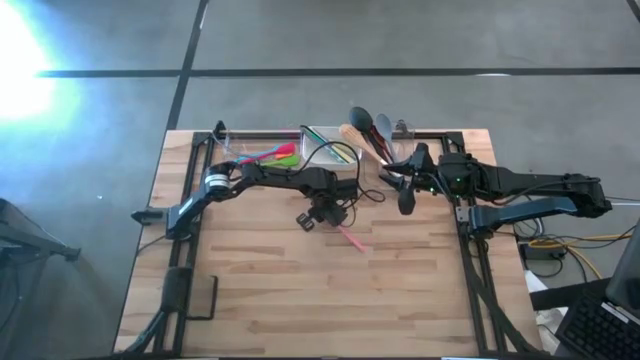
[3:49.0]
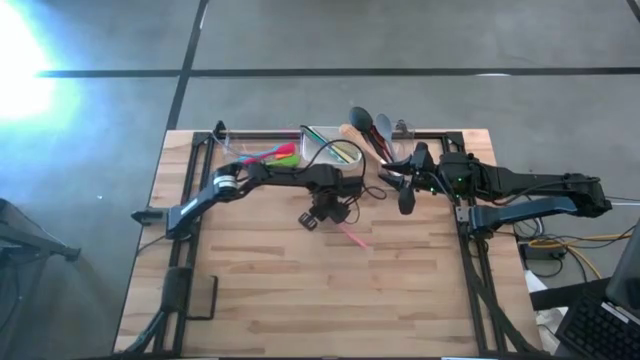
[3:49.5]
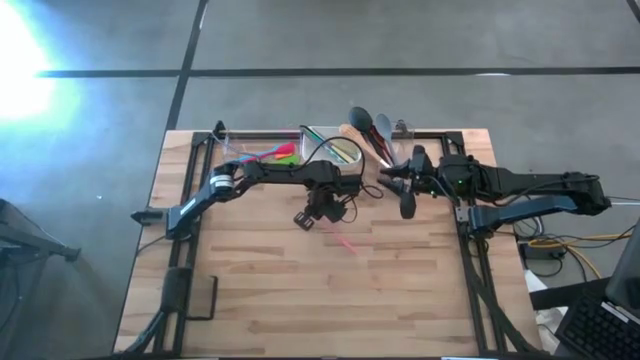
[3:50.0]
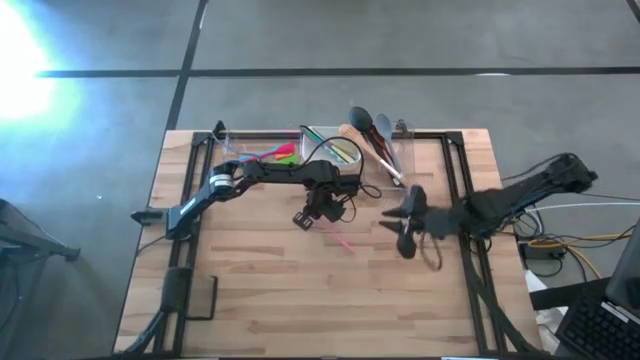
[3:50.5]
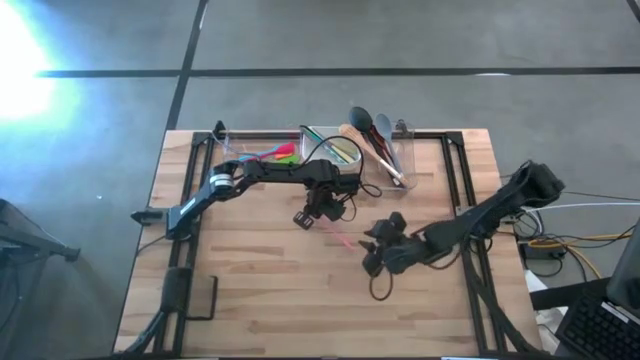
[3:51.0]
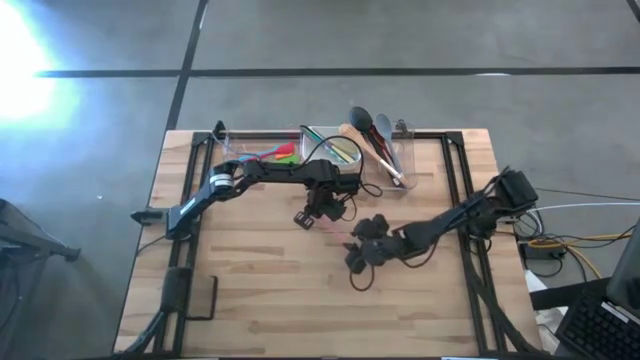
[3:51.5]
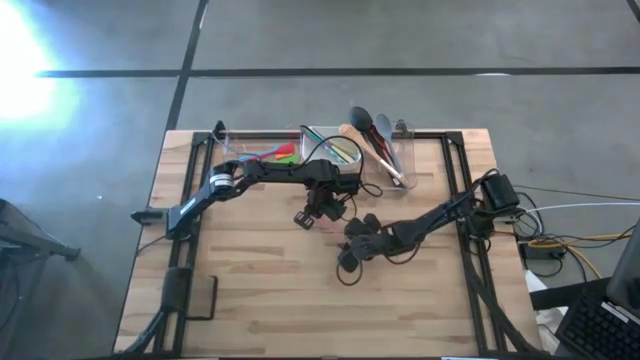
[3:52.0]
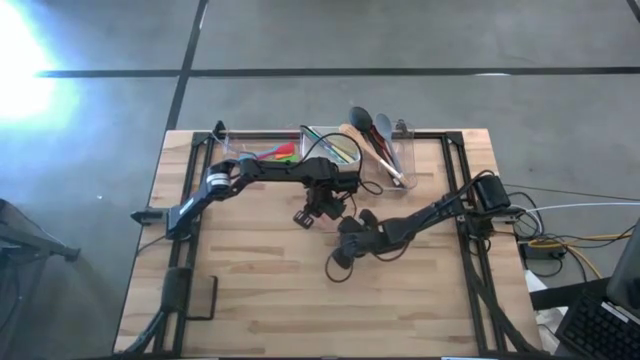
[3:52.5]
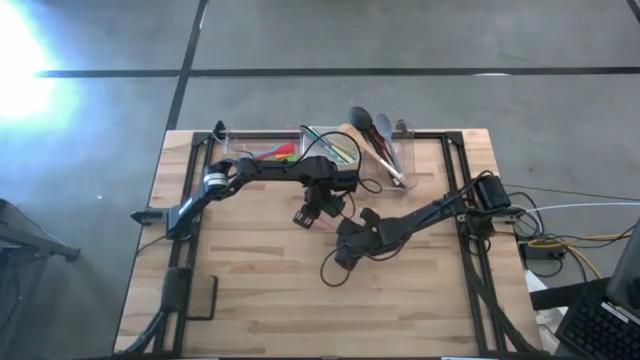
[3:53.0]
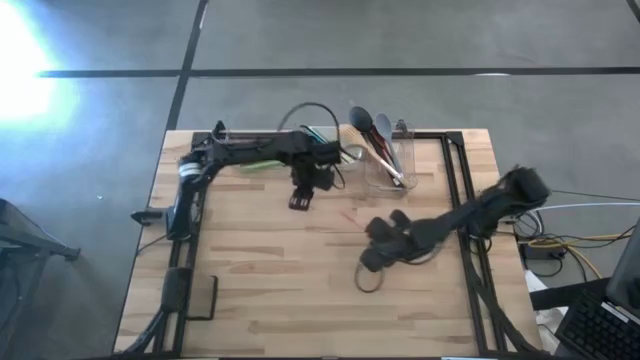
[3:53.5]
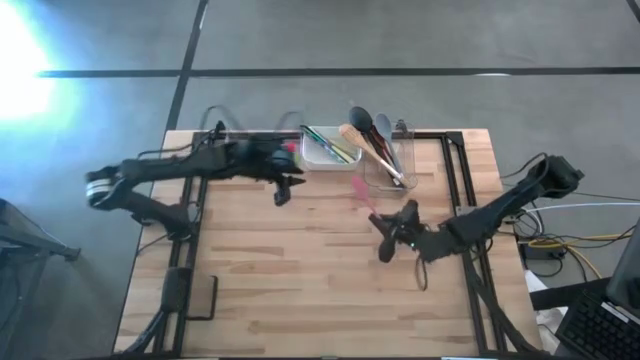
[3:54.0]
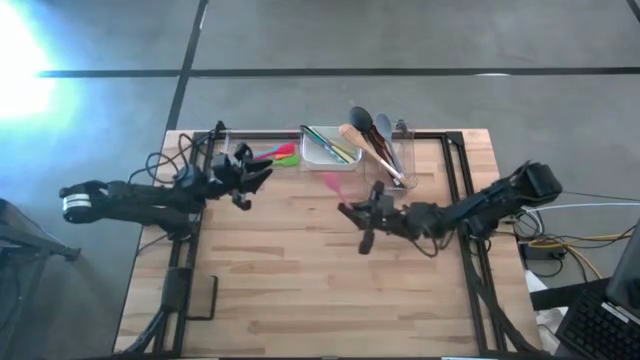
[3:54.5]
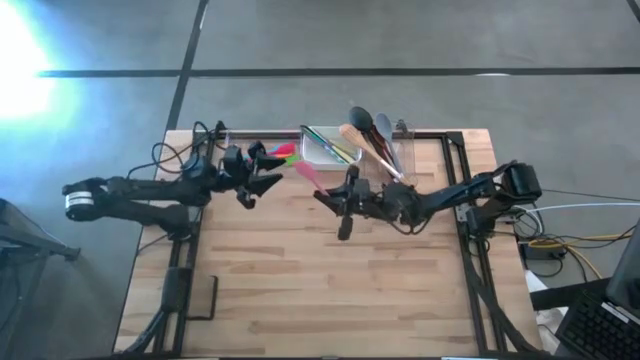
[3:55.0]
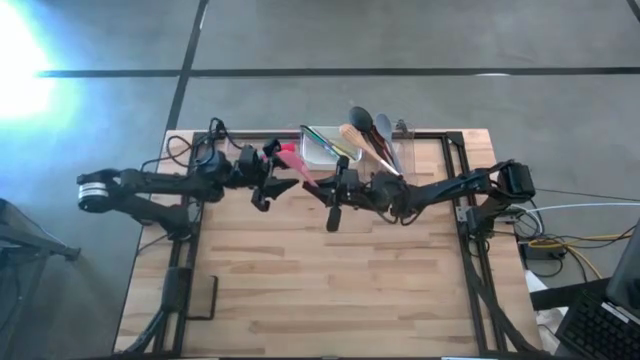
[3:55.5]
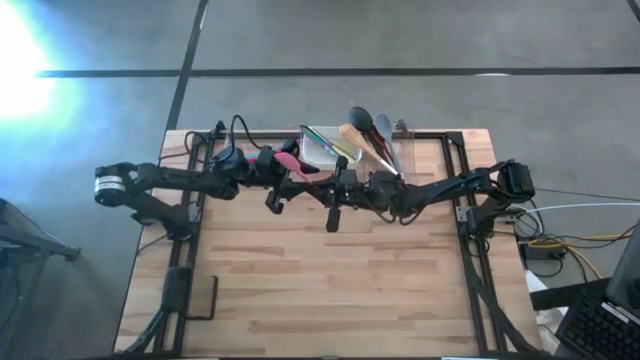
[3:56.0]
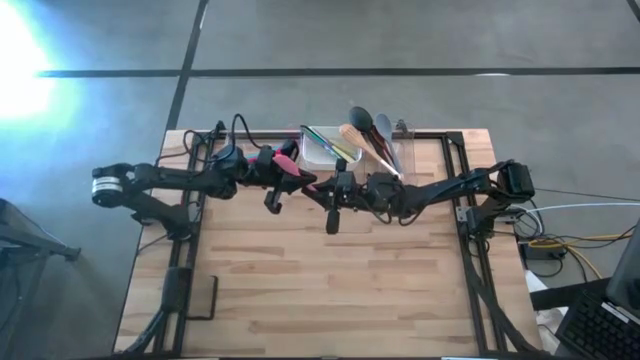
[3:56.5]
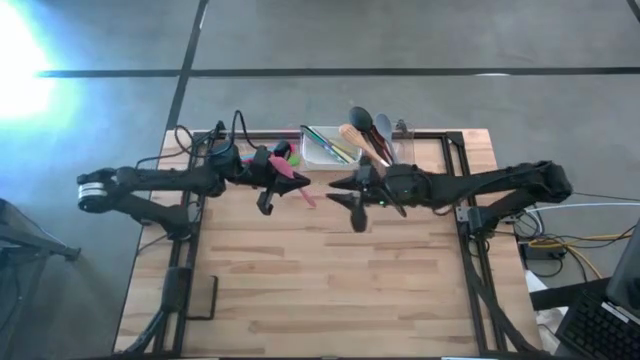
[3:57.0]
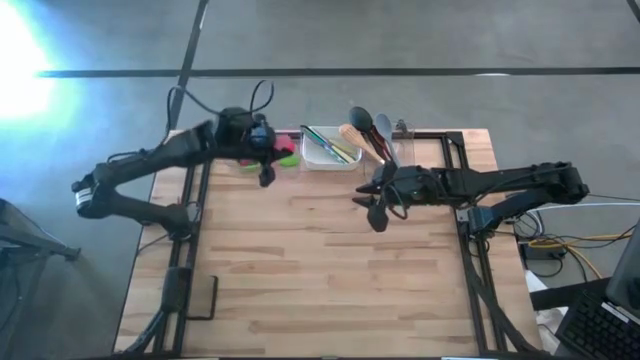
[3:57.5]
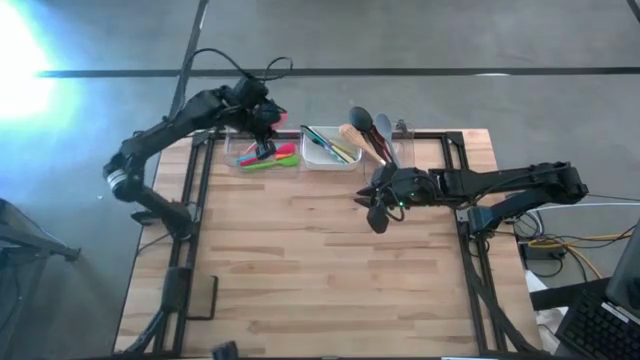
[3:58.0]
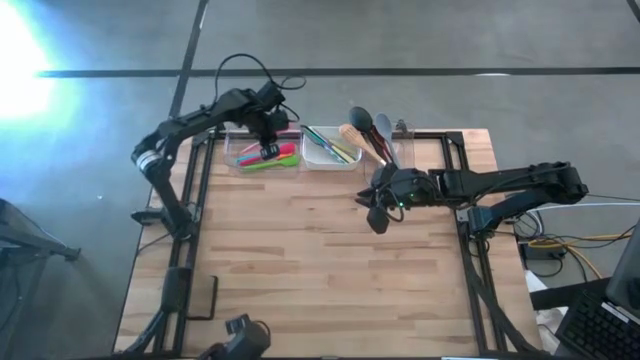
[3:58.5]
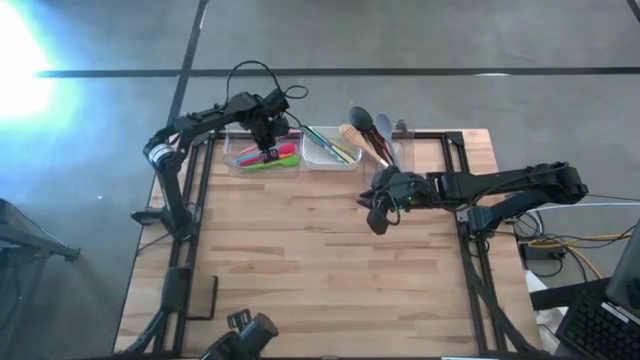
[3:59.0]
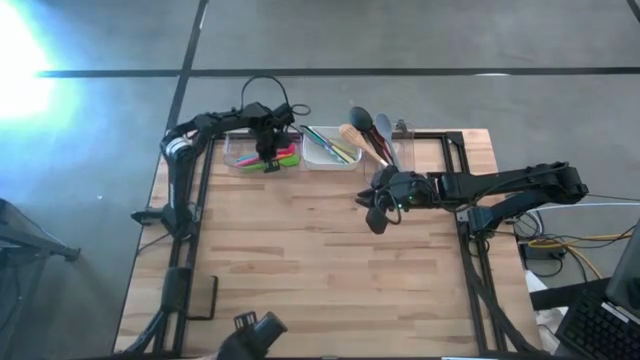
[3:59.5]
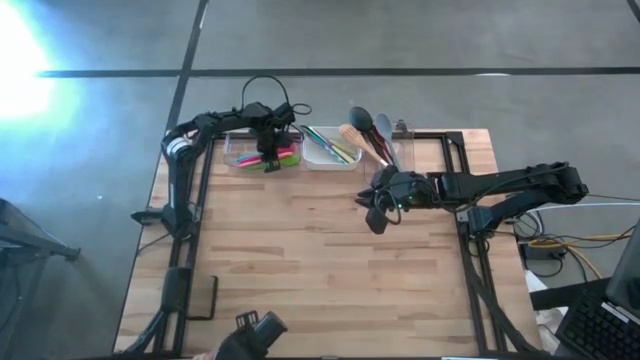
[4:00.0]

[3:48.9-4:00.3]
Task: Pick & Place Kitchen Items
Put the pink spatula into the left transparent bin

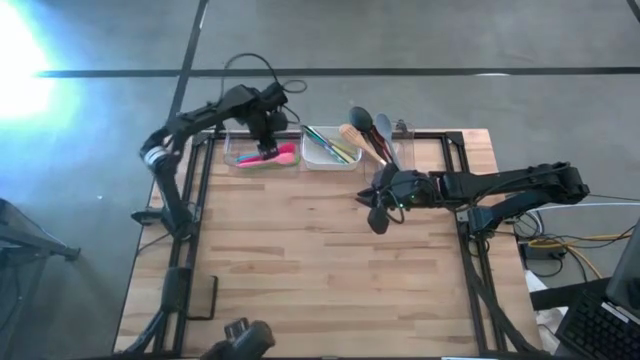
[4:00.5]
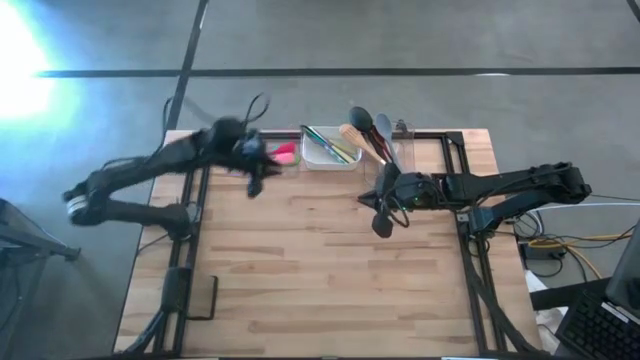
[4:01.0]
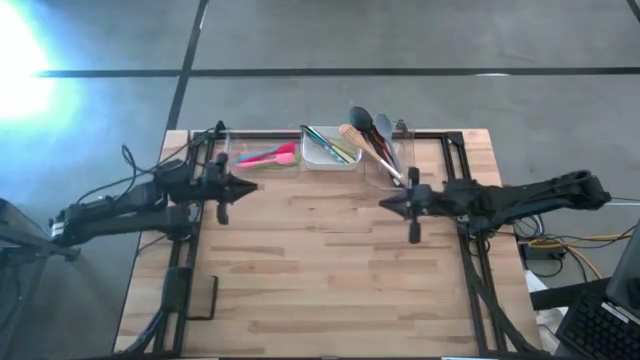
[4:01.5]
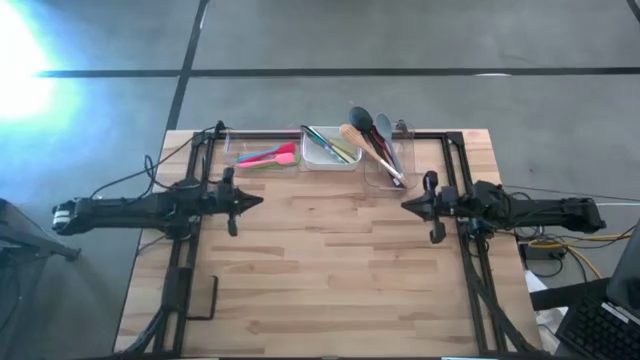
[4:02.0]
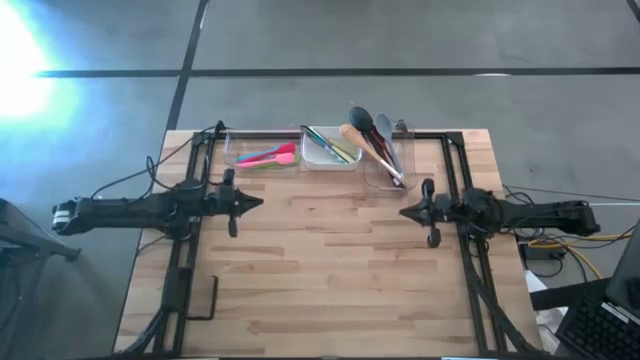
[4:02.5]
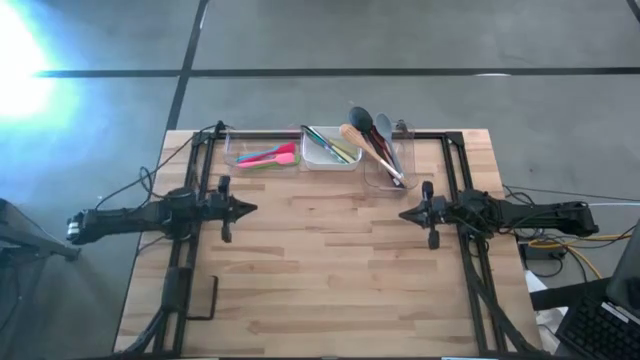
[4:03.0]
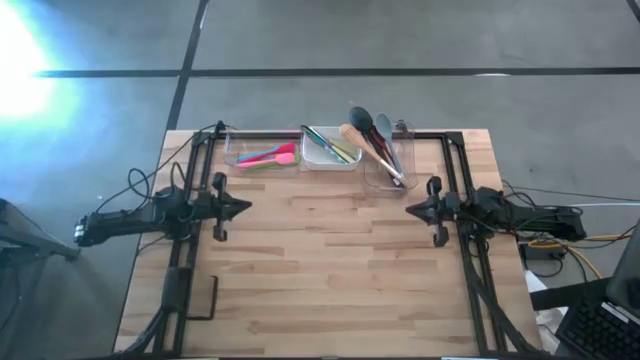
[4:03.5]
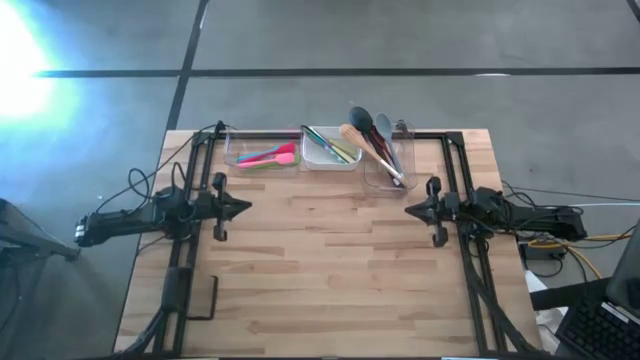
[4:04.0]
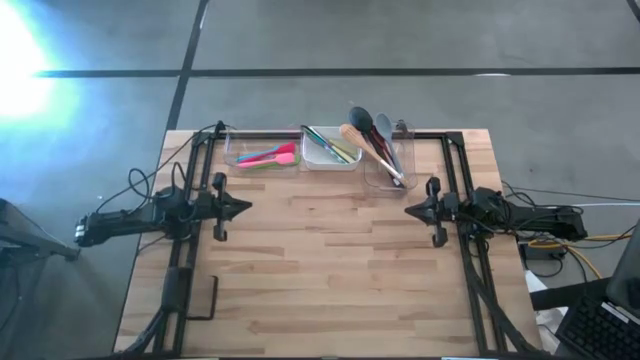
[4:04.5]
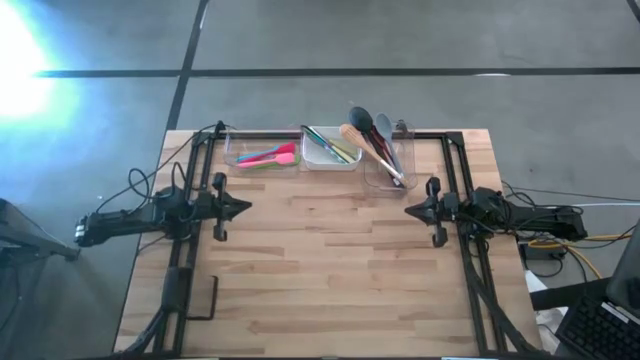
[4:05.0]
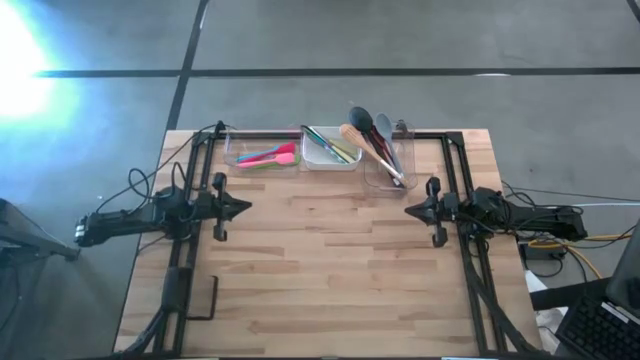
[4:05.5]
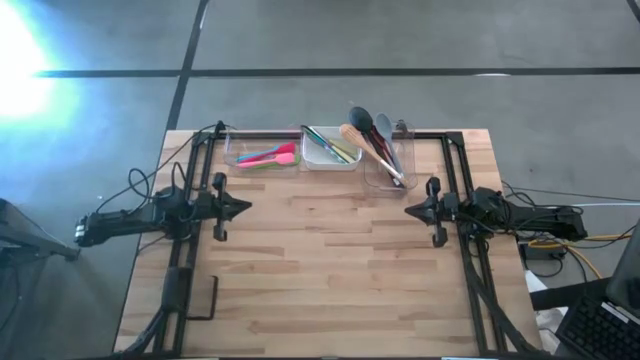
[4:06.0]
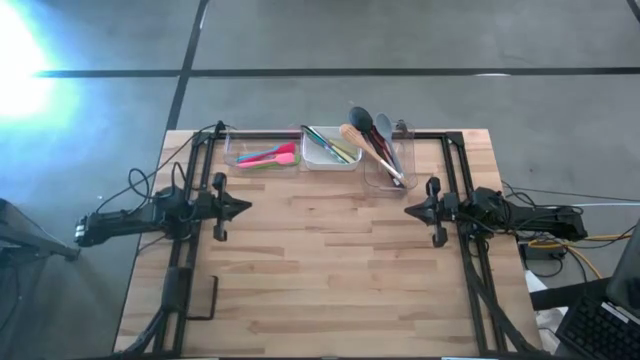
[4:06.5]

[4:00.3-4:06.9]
Return to Home Position

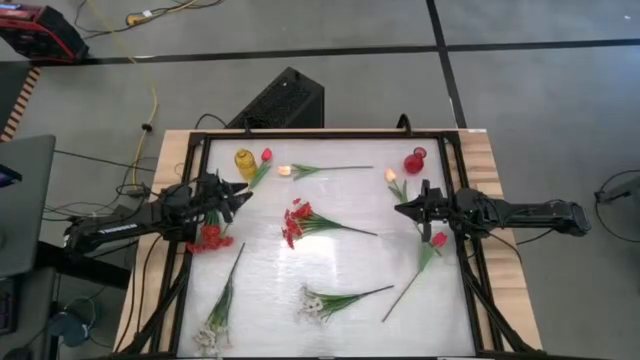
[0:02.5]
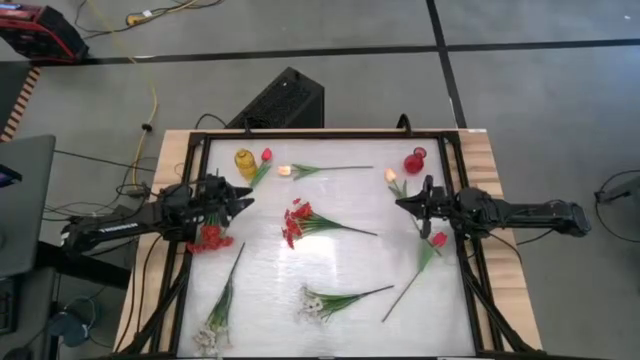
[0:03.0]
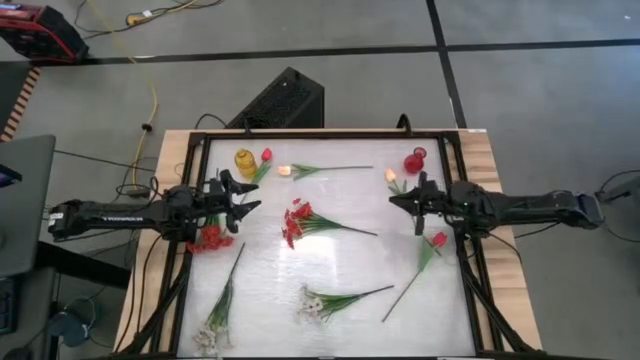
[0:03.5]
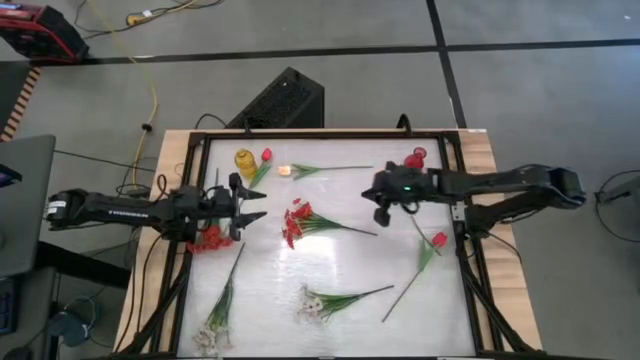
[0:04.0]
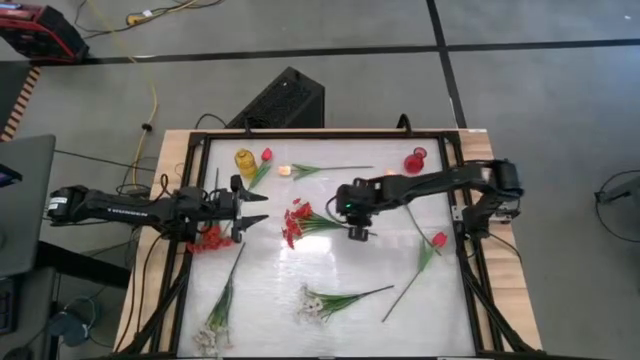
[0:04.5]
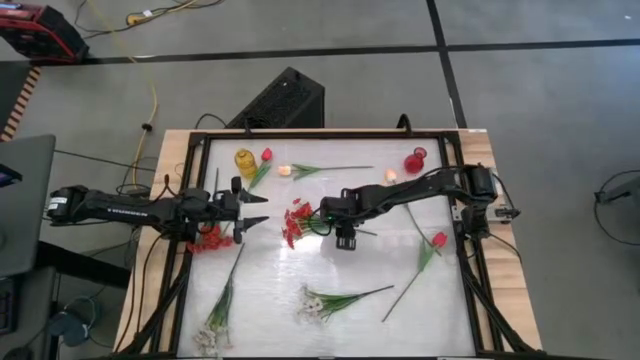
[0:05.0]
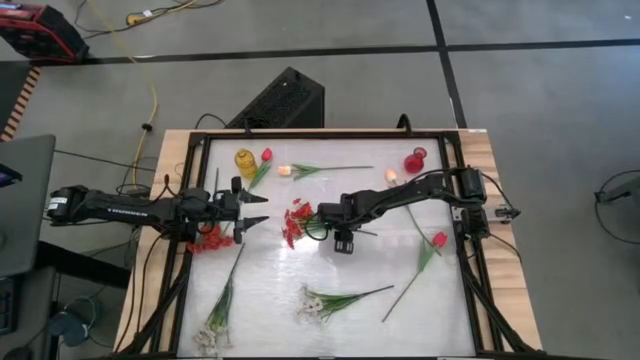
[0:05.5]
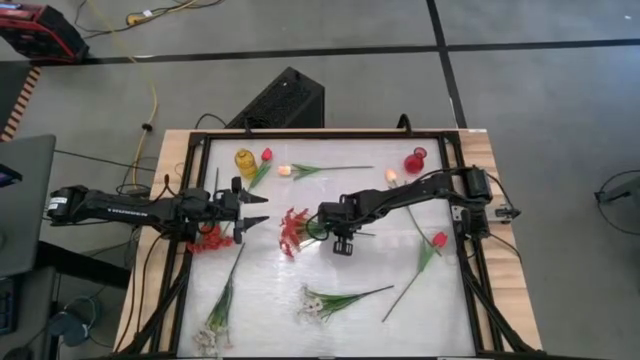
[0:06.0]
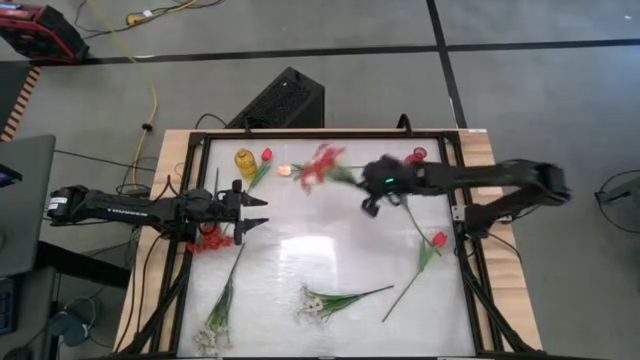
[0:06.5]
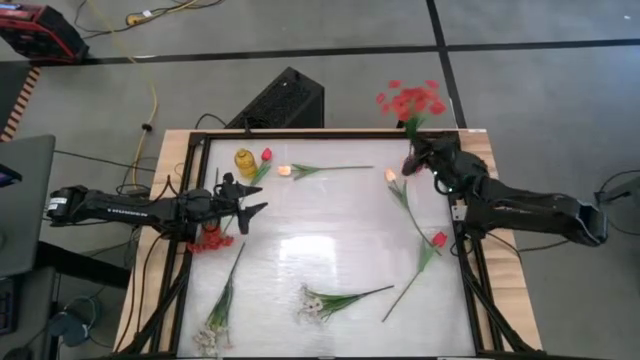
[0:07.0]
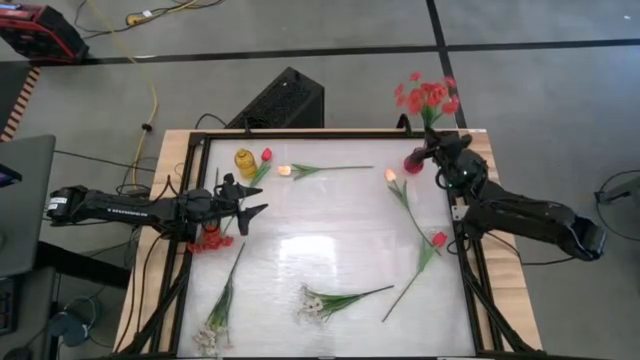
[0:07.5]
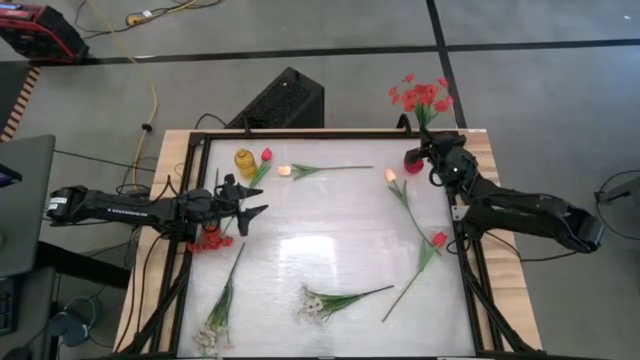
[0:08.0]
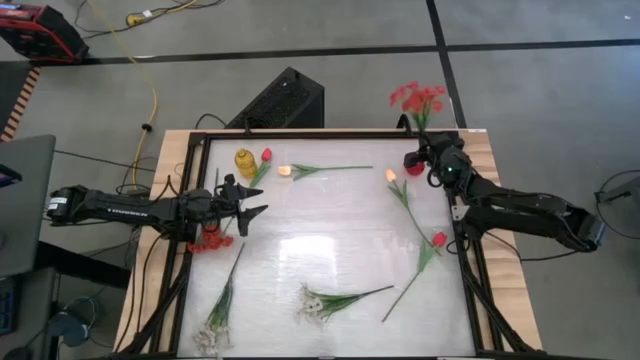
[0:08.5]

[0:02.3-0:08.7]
Task: Sort flowers into vase by color
Put the right red flowers into the red vase
